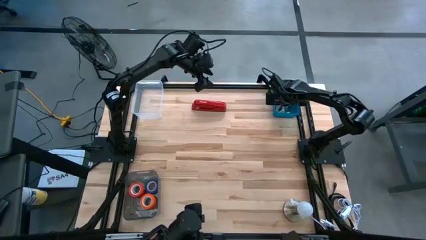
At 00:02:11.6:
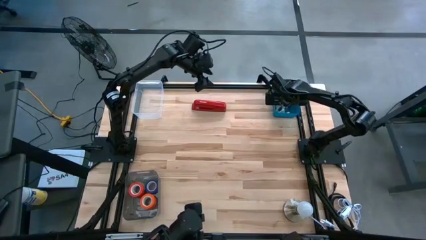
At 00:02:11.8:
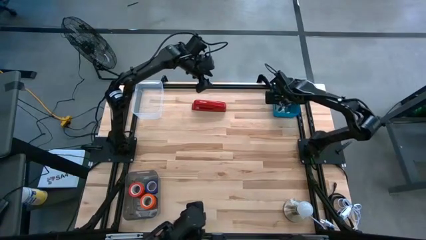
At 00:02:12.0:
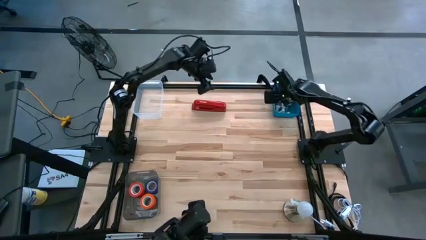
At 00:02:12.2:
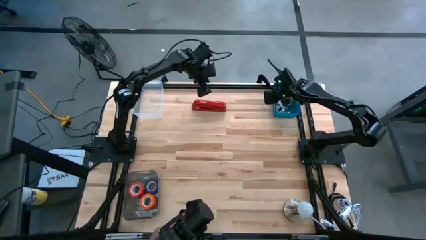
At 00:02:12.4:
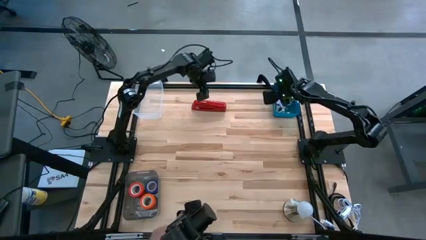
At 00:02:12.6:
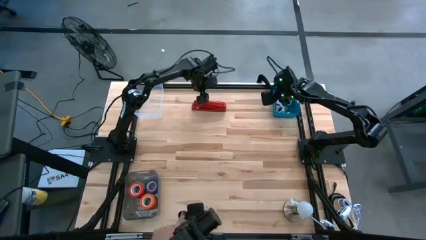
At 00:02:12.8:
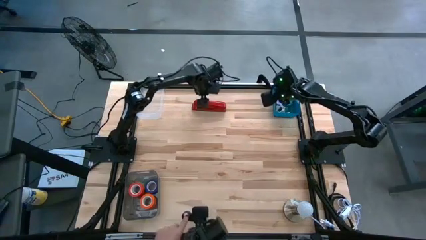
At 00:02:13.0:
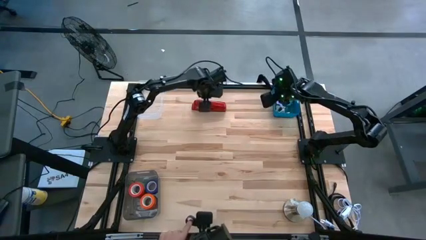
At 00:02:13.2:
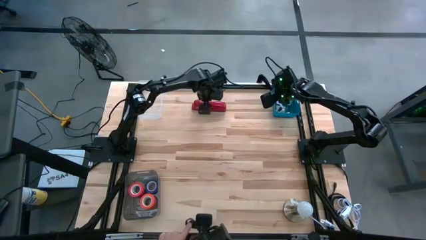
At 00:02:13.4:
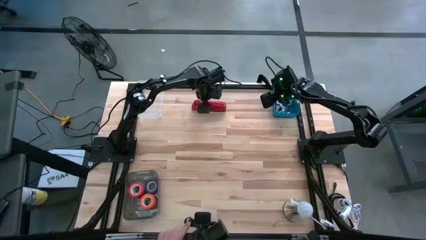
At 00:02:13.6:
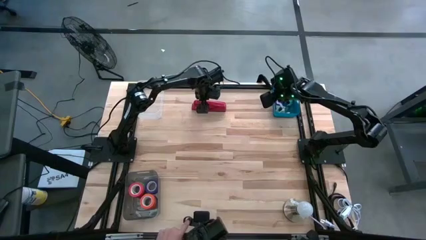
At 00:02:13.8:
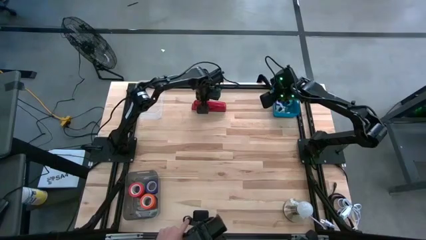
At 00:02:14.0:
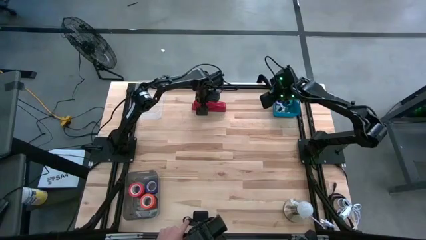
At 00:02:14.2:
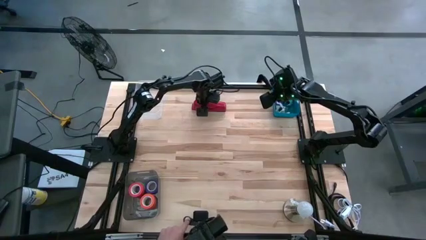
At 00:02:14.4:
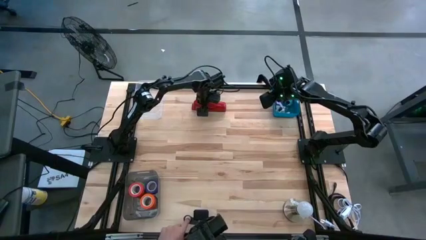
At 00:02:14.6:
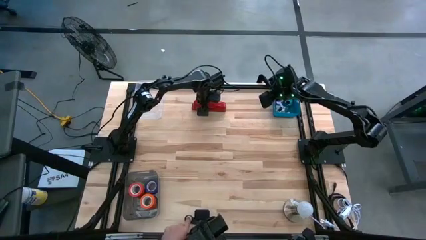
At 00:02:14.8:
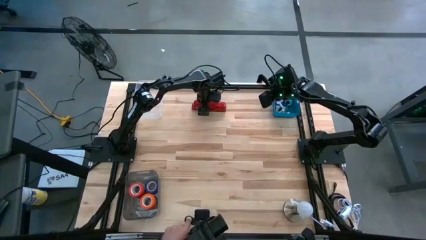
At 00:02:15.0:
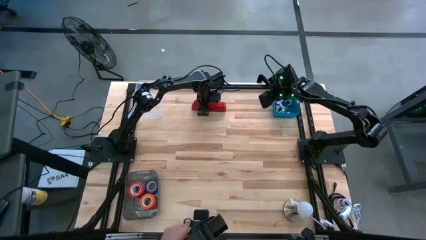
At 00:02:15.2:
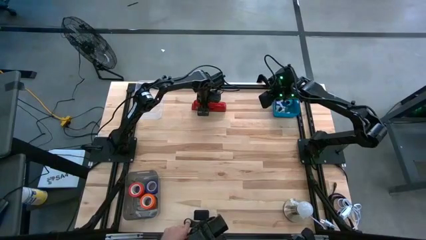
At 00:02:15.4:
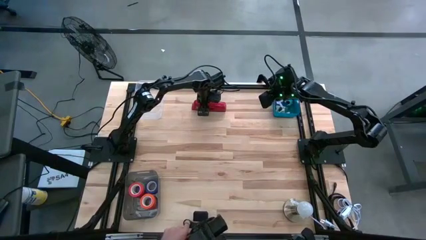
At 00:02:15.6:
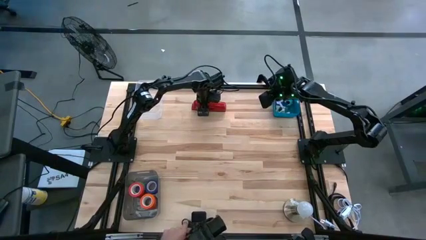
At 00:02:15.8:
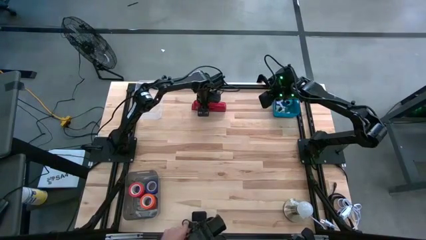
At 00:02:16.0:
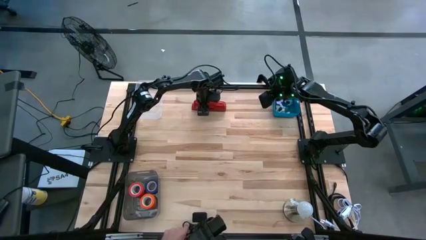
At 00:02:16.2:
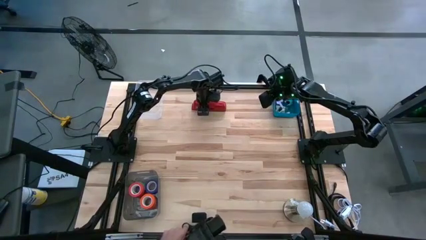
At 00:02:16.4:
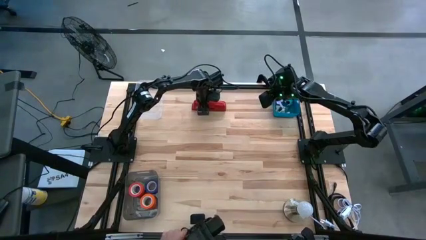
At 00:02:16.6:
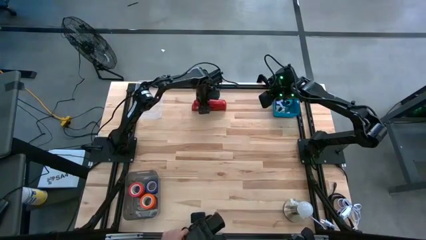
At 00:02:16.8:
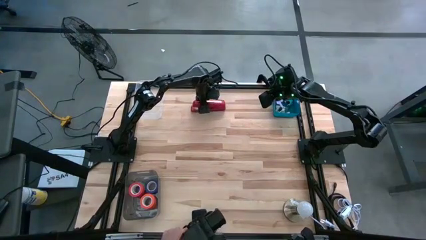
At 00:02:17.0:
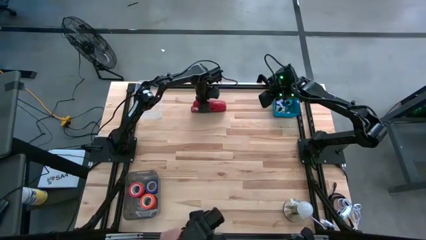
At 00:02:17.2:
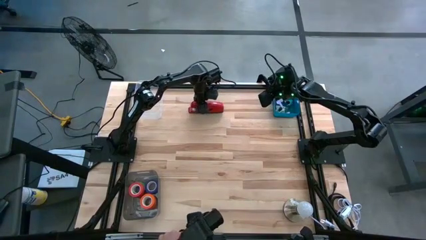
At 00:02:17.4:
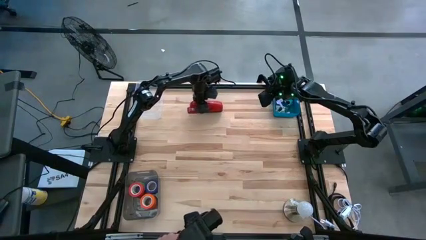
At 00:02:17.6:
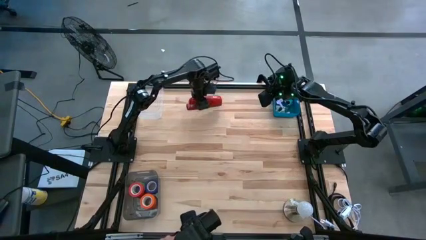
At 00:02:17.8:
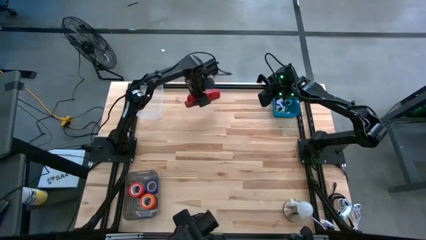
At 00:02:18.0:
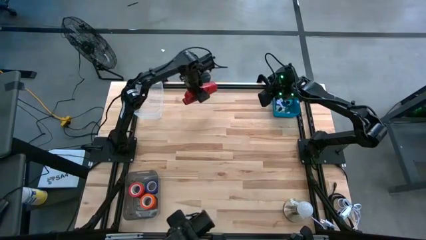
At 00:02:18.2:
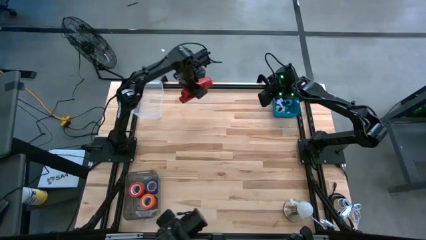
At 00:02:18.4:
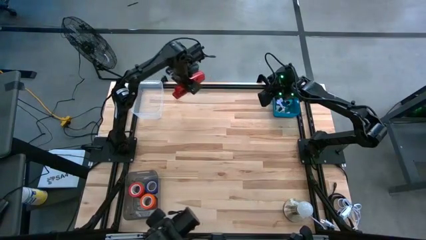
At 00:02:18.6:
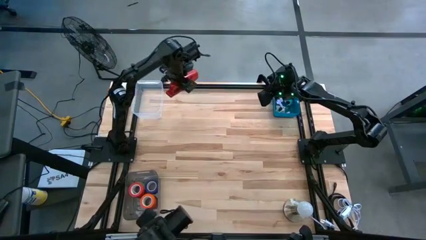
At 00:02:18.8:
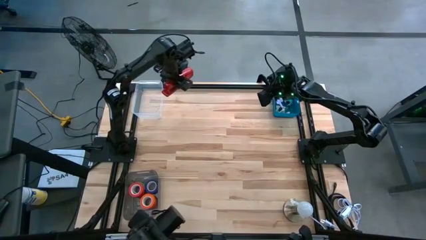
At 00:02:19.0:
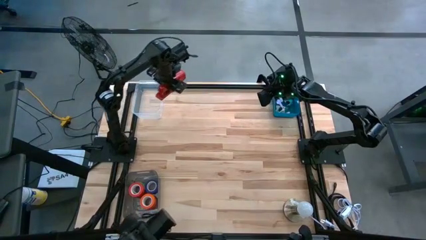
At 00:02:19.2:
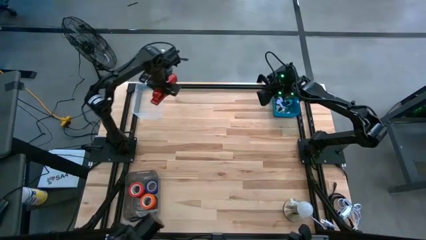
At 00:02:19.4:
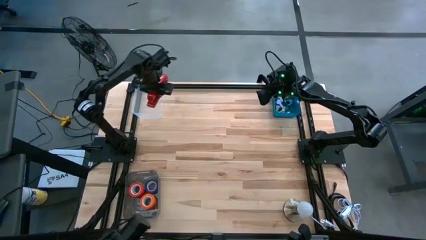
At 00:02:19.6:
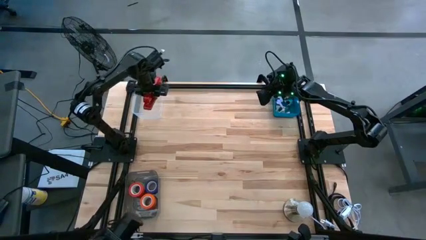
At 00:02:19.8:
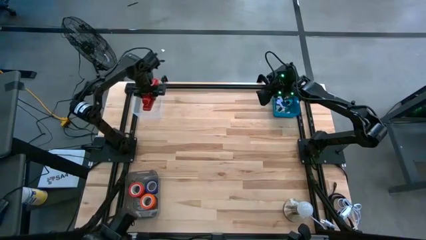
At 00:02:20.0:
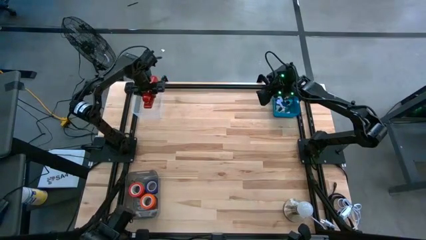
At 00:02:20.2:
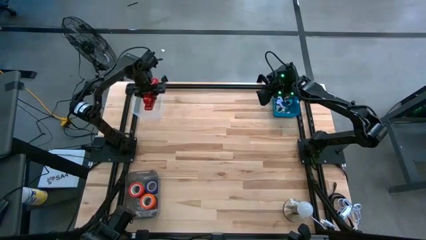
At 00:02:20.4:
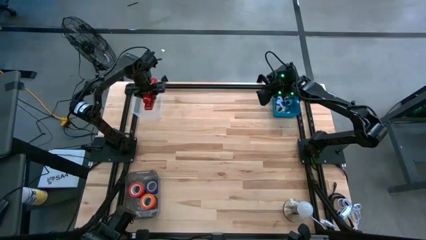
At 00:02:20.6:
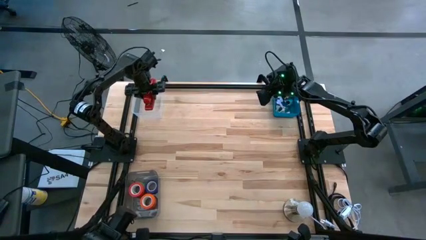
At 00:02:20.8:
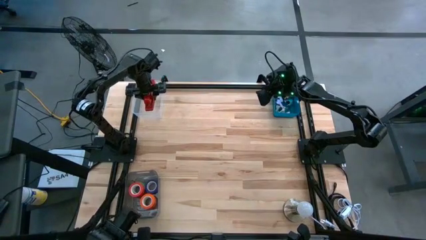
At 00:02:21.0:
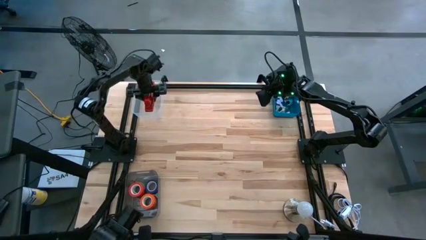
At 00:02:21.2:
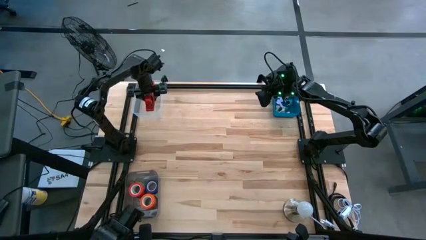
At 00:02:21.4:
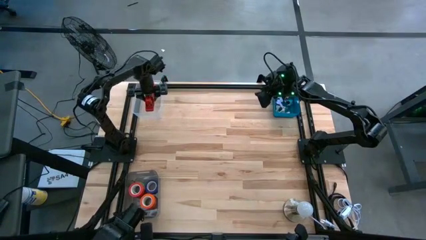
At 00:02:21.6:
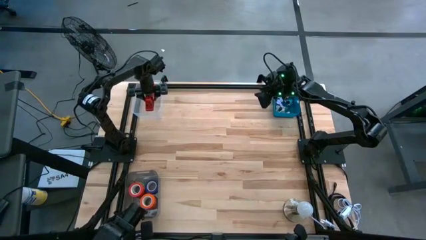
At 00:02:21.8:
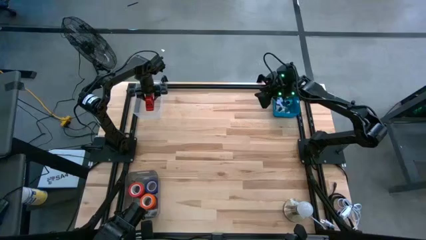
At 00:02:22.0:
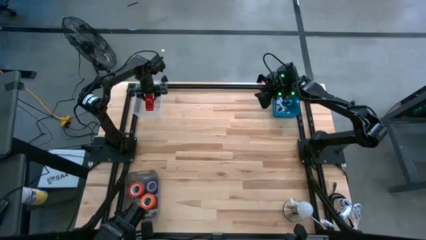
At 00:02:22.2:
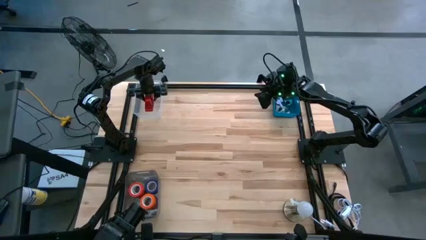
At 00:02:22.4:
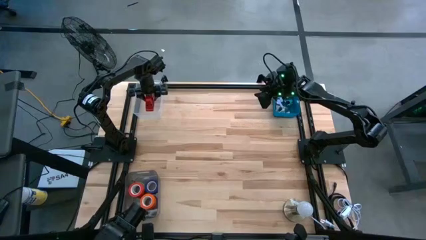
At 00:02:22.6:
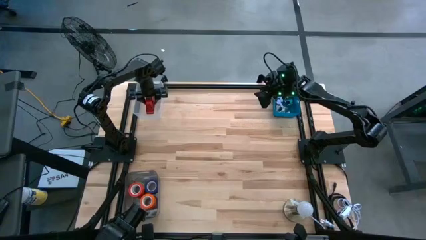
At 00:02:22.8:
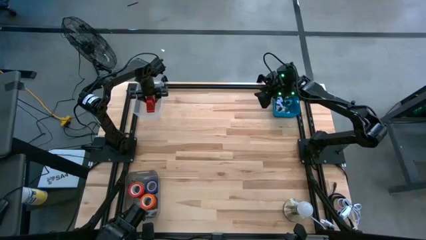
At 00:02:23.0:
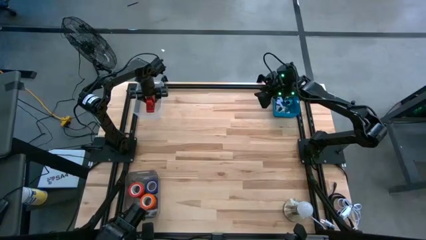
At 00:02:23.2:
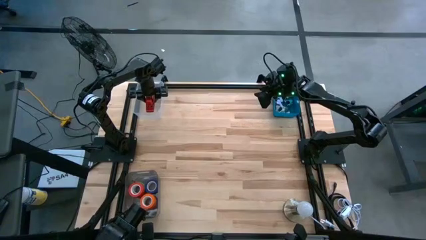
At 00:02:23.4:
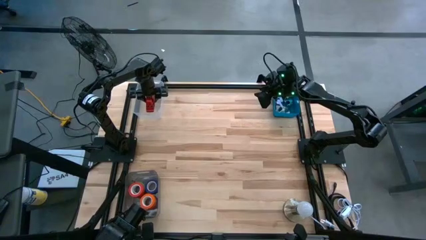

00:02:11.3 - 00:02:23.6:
Task: Pick and place Stapler, Stapler remover, tape
Put the red stapler into the transparent bin

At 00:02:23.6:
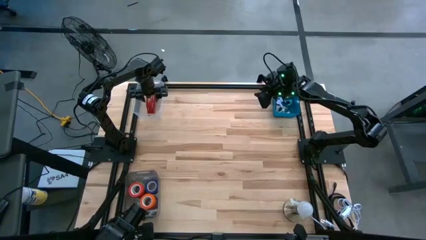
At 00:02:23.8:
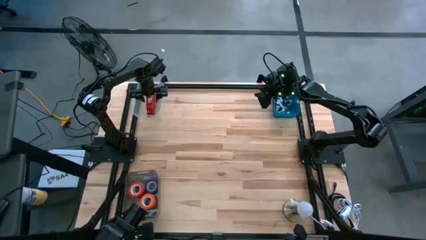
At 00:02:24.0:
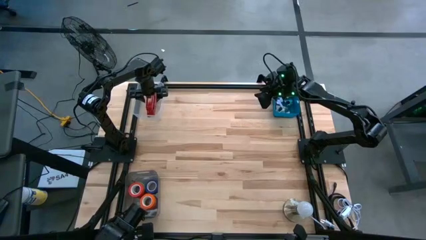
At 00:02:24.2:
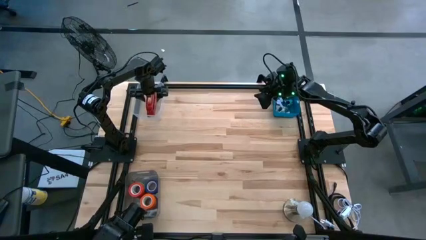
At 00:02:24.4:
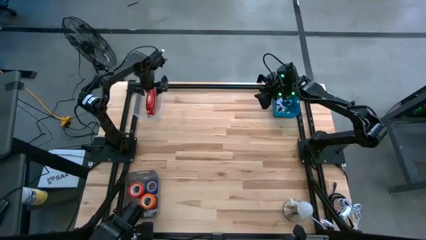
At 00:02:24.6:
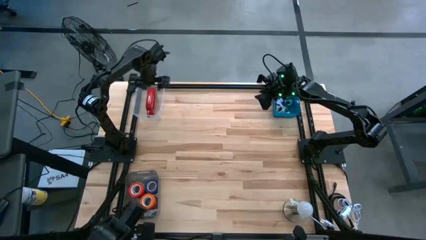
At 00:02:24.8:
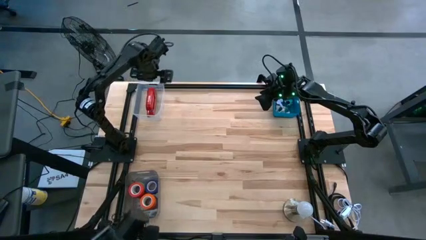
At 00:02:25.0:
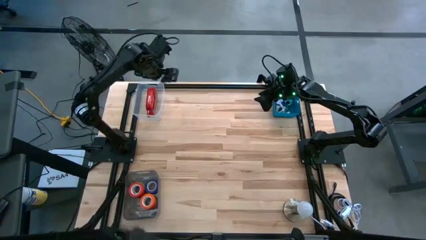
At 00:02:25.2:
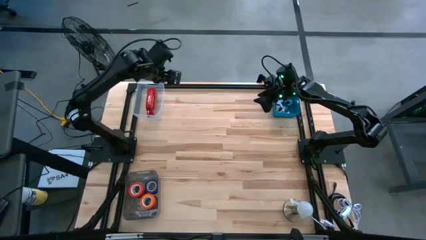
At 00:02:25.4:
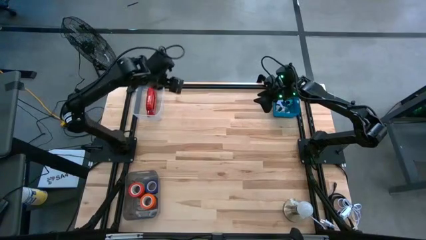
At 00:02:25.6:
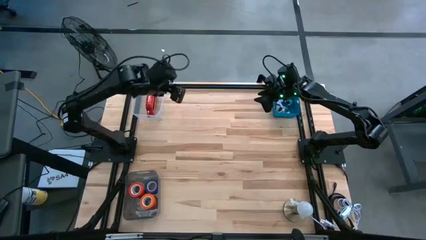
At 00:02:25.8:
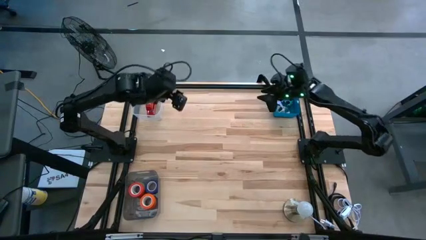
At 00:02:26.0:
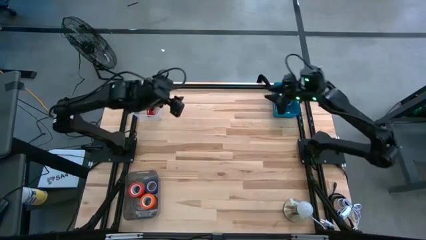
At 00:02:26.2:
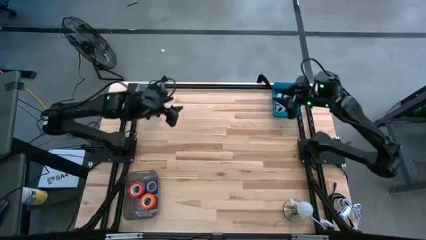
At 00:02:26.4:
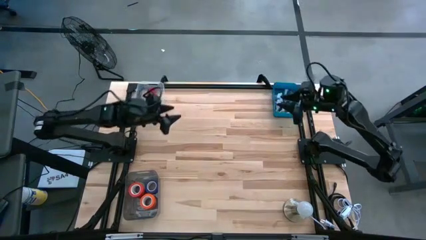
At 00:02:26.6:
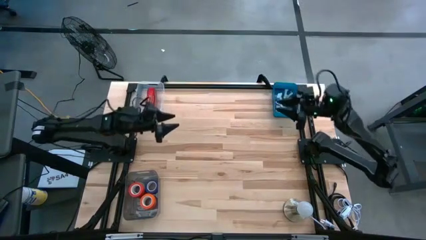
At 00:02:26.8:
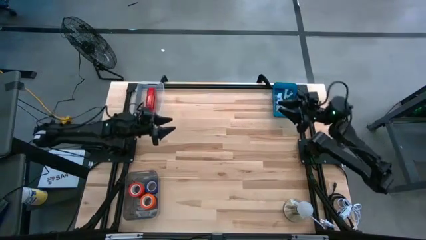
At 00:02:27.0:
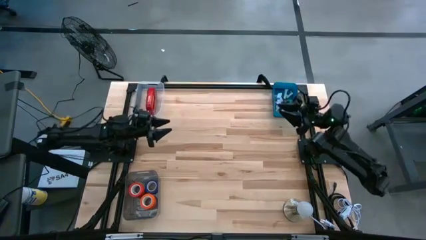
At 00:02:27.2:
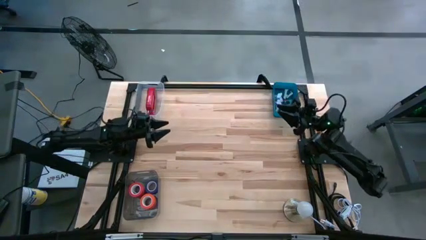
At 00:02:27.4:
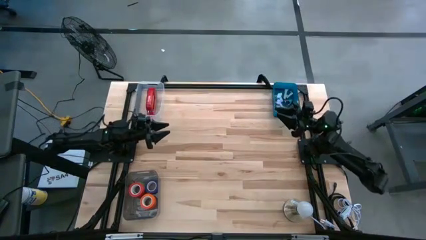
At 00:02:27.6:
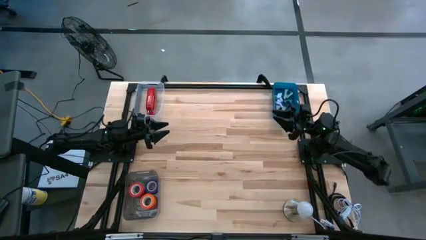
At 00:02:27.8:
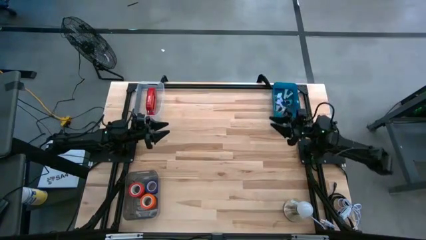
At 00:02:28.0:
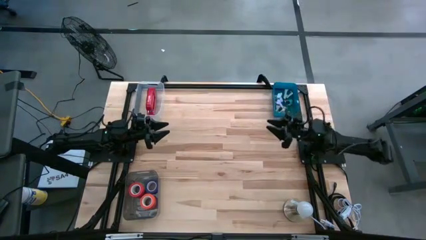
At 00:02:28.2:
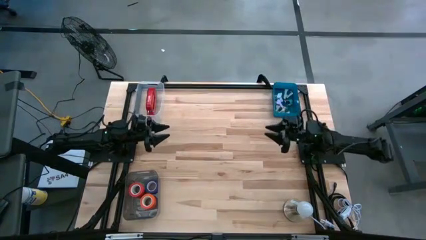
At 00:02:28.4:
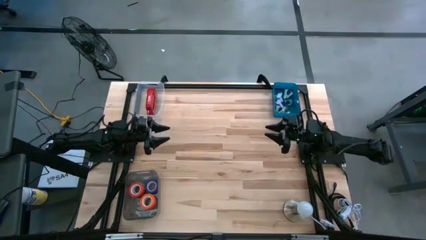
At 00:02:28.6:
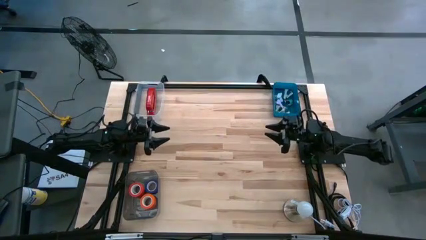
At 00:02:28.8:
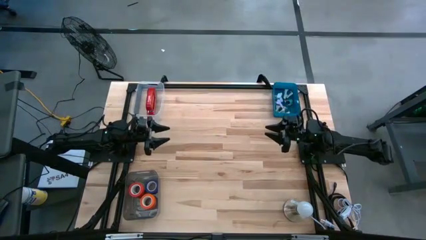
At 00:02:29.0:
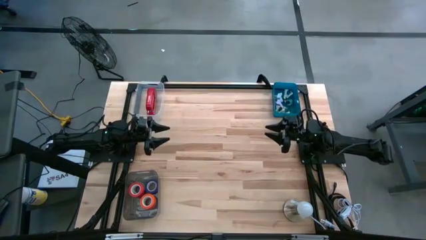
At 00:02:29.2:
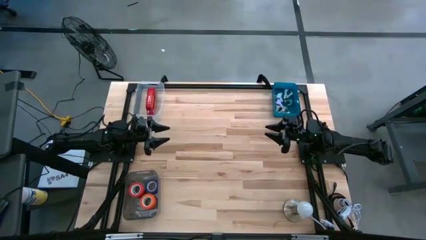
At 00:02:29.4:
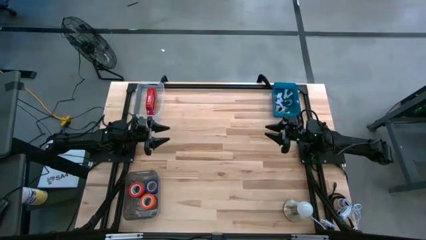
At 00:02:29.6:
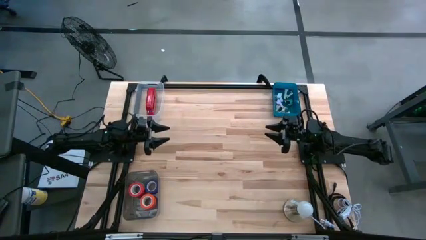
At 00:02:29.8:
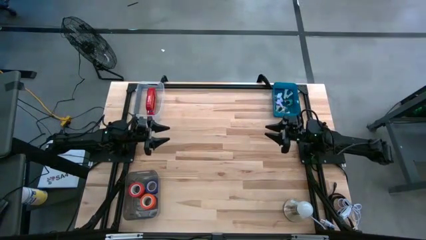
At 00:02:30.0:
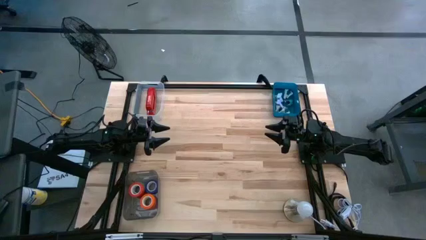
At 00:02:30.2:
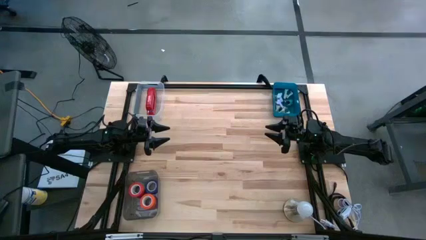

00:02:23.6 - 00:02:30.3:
Return to Home Position
